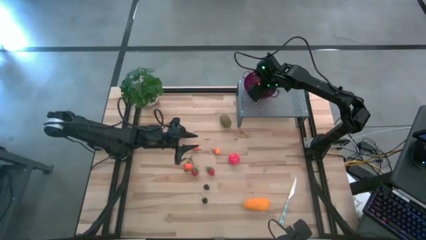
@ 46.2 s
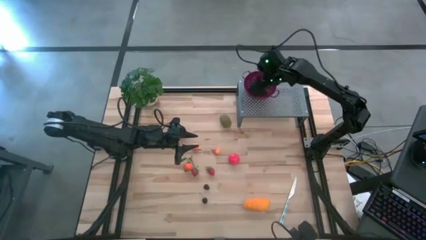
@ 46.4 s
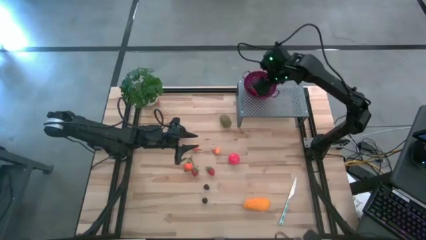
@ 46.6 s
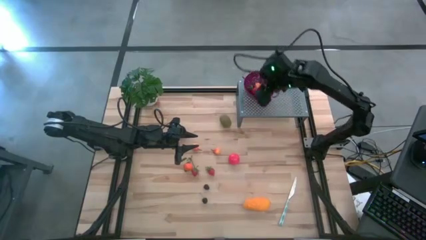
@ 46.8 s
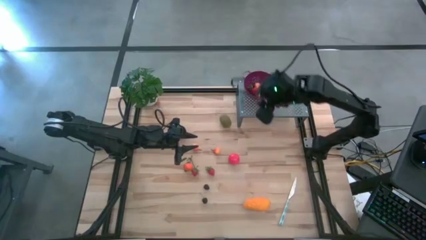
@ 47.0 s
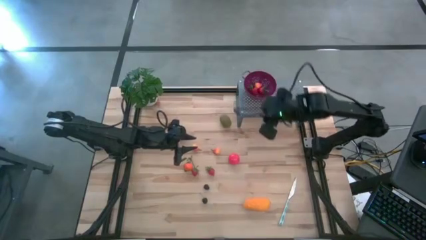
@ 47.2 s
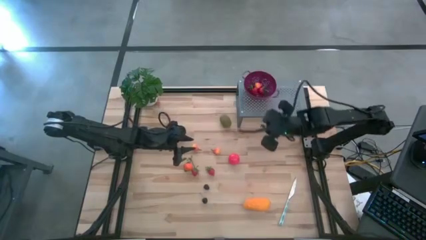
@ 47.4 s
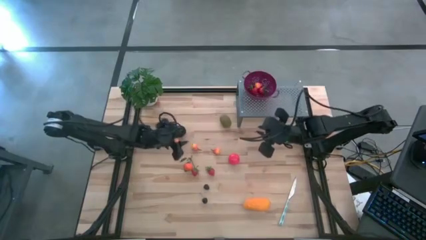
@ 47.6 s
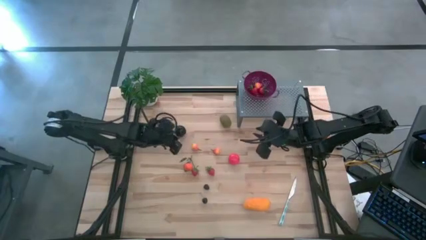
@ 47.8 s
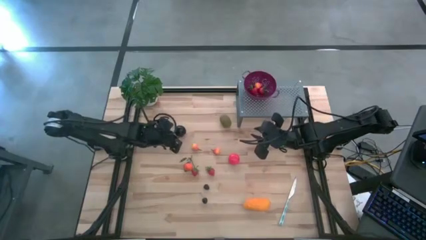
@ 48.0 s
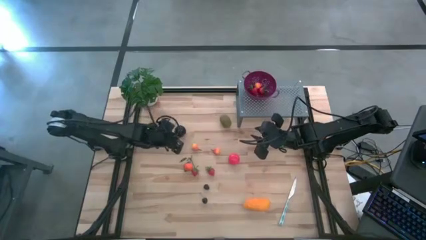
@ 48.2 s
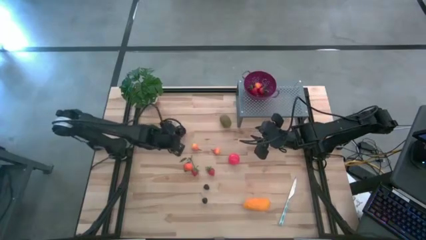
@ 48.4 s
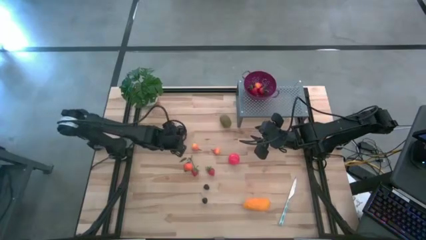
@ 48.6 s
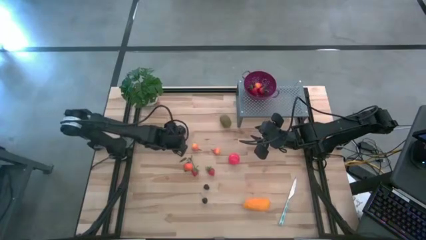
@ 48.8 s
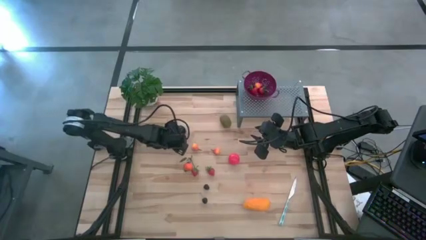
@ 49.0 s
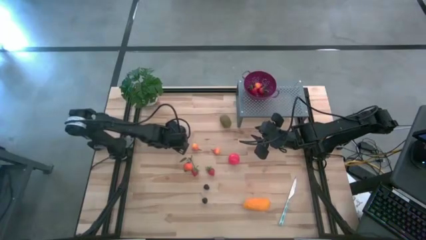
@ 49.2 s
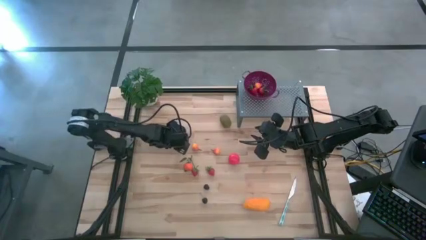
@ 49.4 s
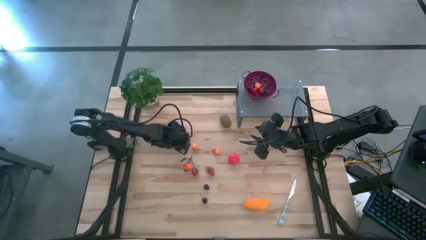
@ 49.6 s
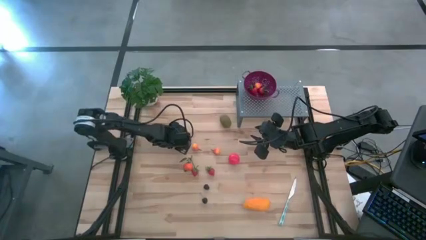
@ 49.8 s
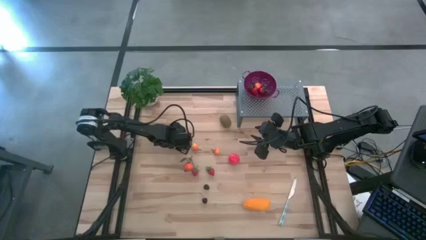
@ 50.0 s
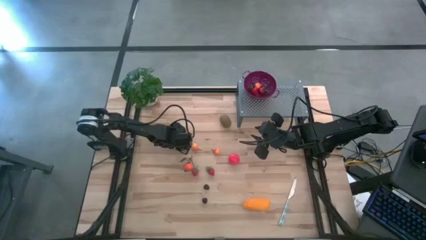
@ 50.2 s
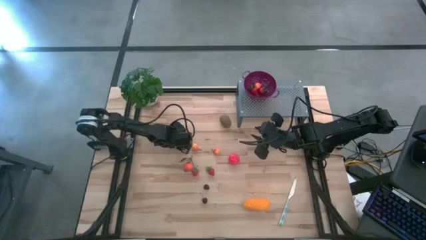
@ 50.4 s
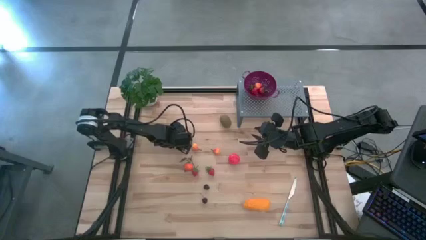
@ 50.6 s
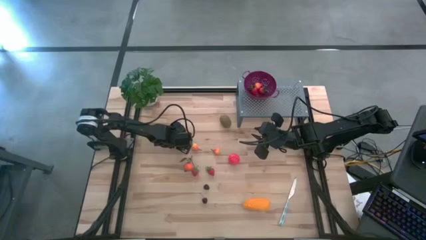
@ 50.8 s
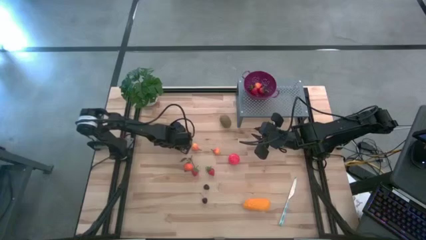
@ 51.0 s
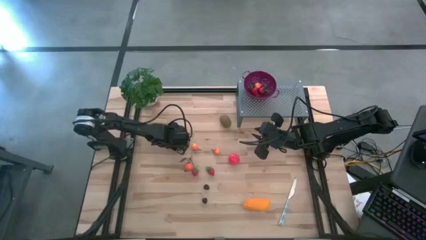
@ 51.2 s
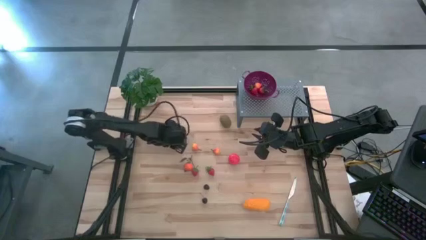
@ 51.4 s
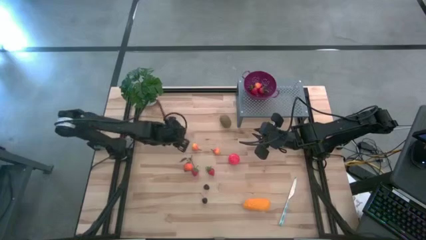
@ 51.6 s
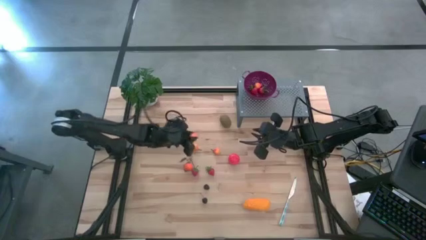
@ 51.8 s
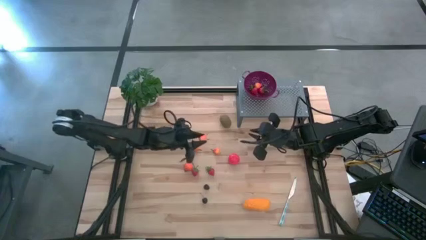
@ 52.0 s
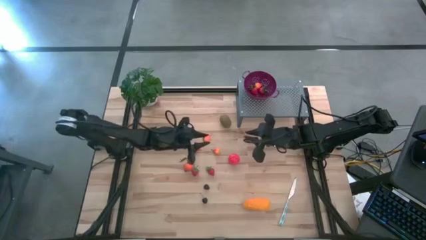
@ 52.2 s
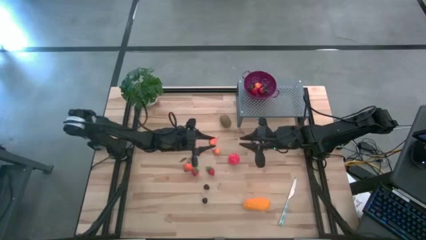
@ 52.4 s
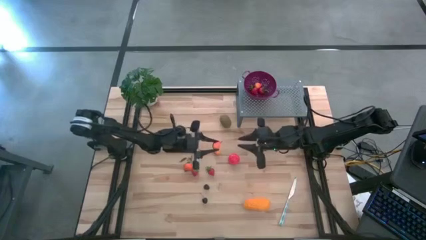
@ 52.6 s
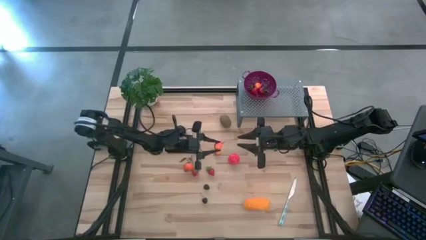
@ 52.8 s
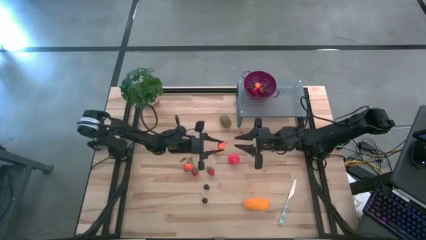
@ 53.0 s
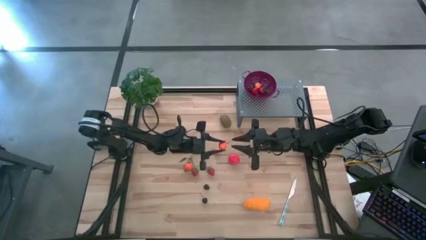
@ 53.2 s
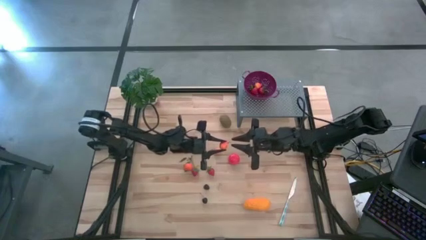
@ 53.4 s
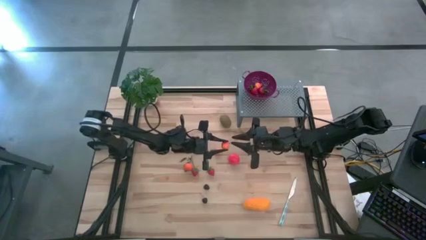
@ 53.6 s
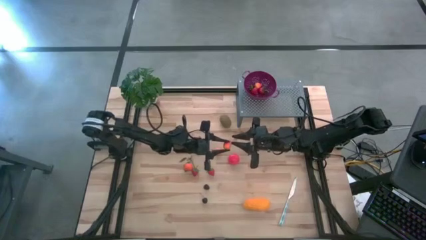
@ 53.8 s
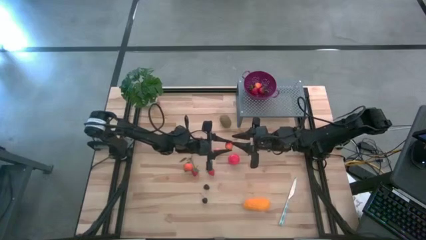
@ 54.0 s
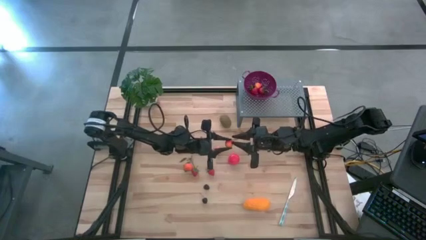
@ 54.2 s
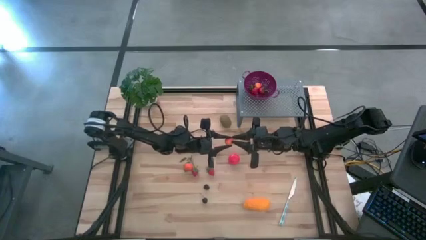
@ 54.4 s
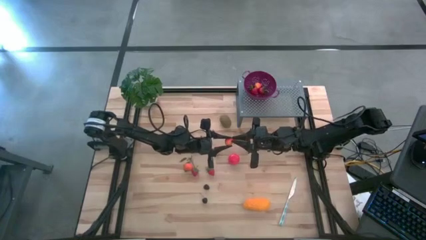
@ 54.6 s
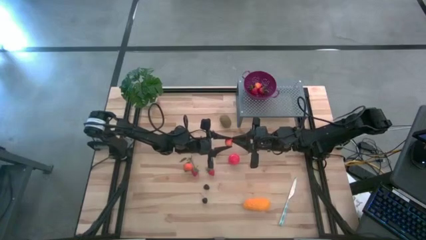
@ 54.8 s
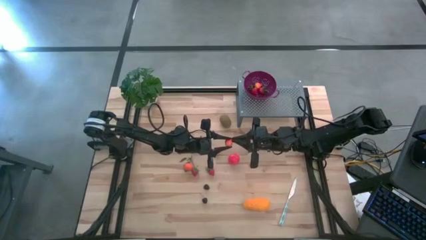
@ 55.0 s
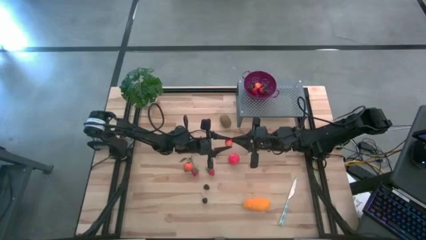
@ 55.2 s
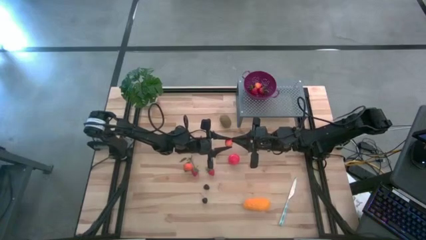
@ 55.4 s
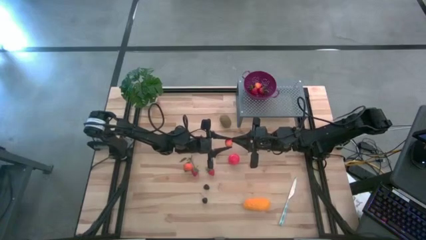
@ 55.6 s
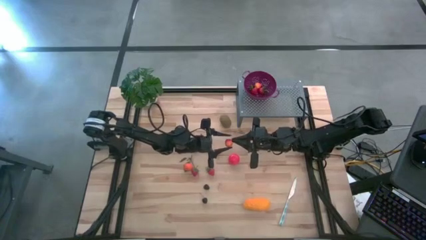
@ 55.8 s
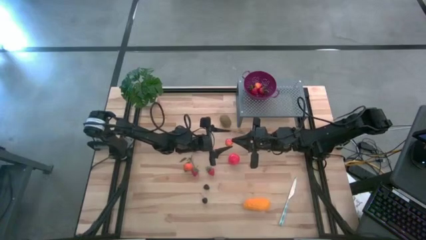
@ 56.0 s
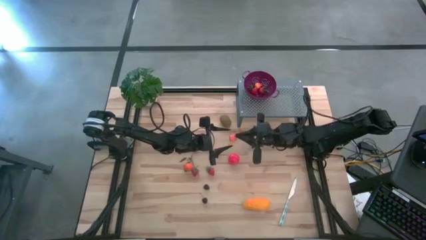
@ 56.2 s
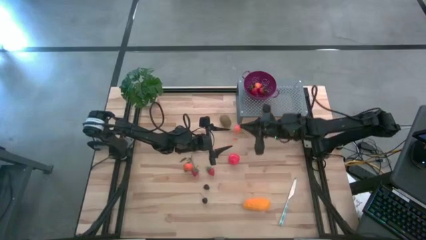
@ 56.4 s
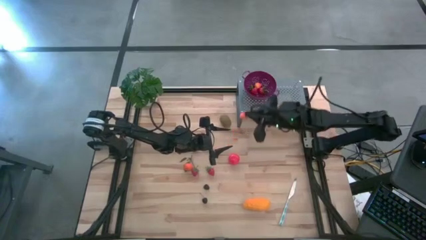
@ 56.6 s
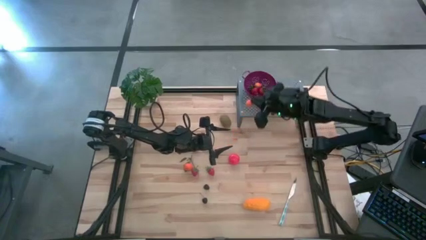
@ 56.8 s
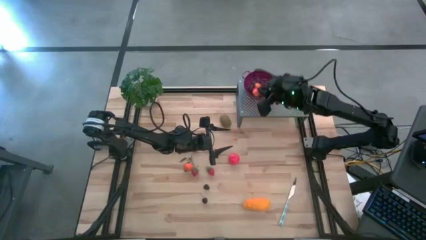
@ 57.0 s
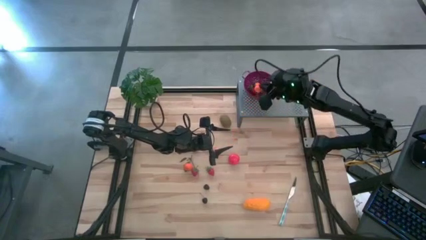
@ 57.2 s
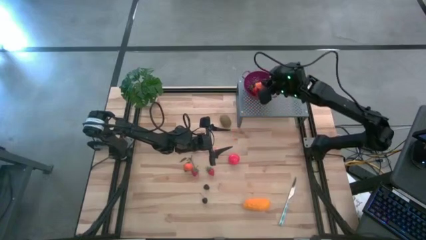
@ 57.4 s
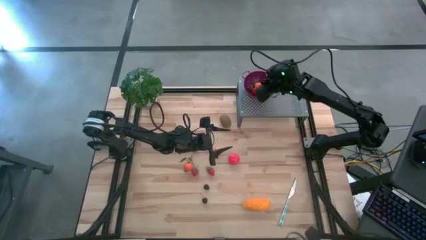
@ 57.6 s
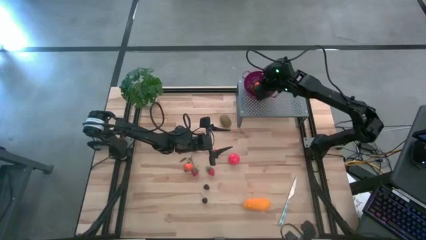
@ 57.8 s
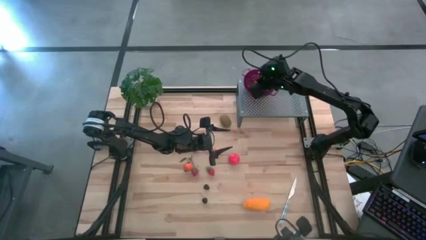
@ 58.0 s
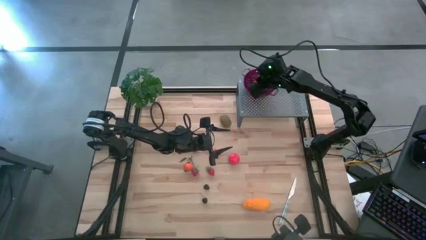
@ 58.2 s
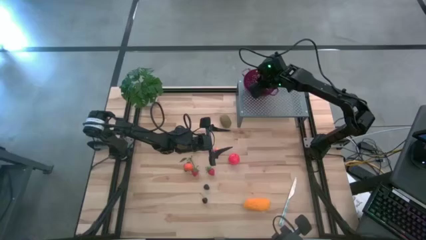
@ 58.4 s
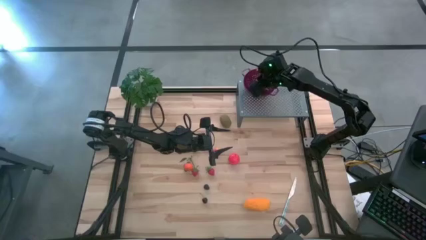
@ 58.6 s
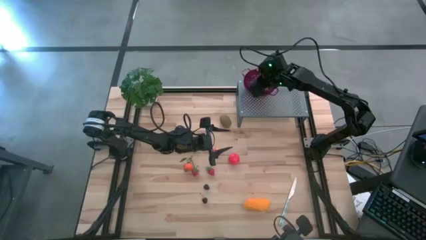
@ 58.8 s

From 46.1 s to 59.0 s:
Task: Pick & Place Fruit
Put the peach into the violet strainer bowl on the shelf

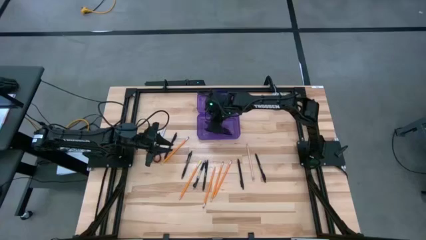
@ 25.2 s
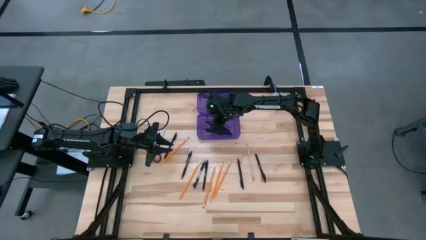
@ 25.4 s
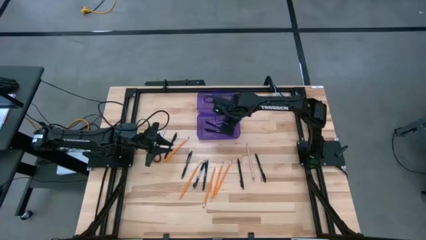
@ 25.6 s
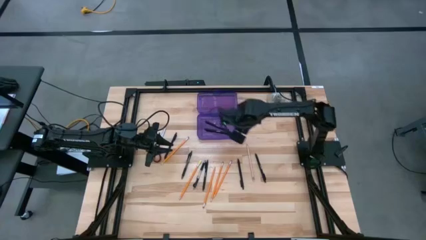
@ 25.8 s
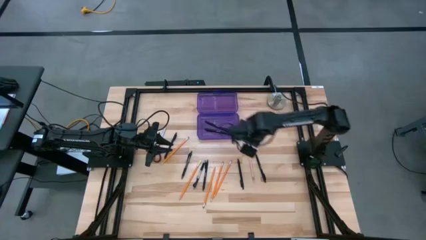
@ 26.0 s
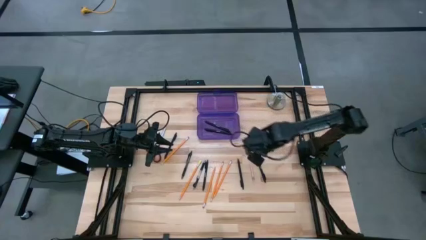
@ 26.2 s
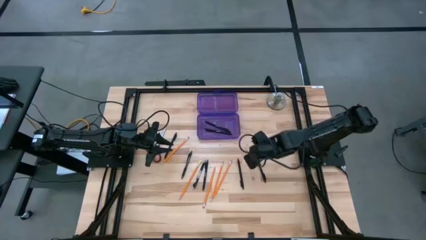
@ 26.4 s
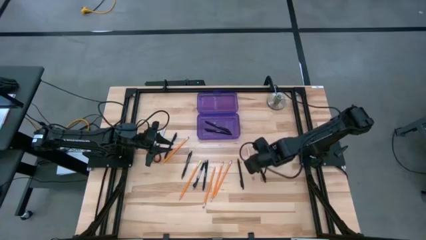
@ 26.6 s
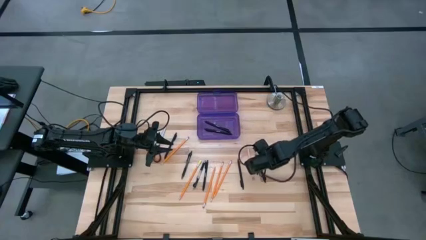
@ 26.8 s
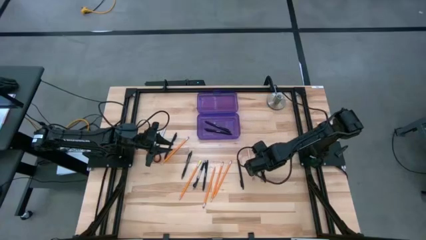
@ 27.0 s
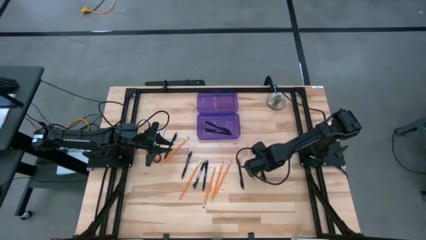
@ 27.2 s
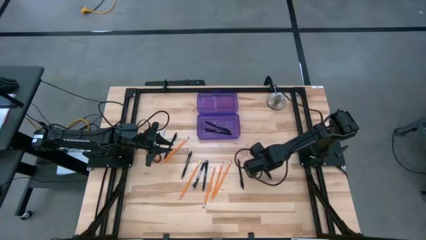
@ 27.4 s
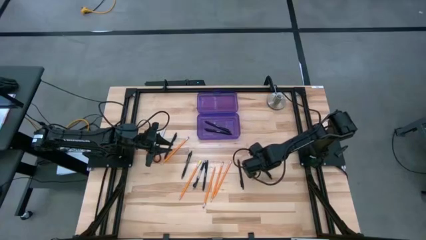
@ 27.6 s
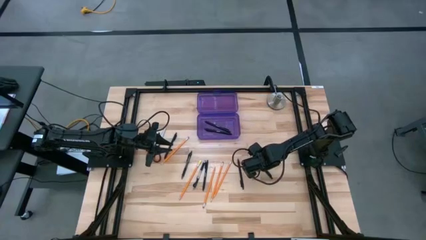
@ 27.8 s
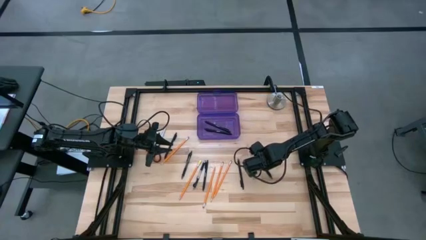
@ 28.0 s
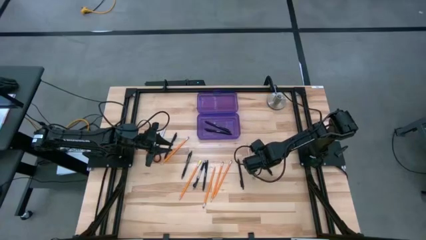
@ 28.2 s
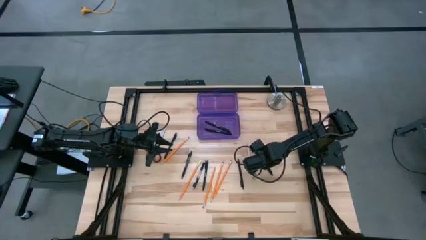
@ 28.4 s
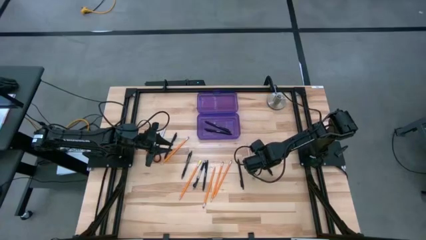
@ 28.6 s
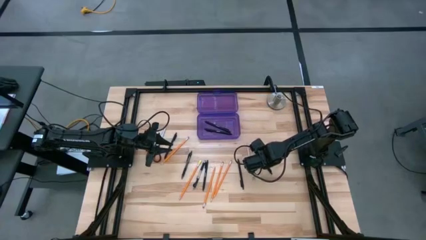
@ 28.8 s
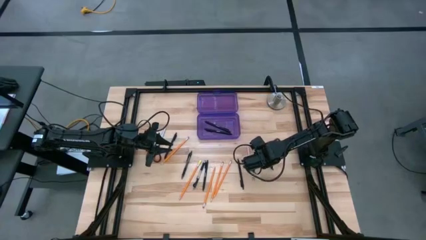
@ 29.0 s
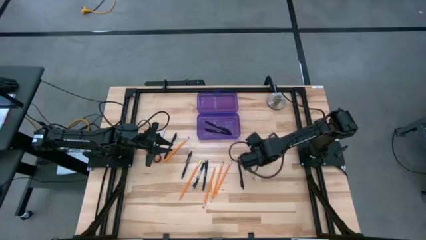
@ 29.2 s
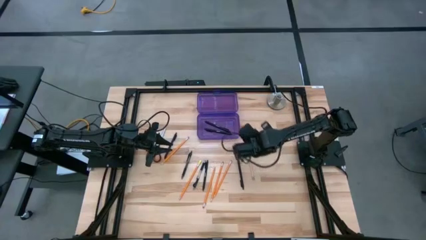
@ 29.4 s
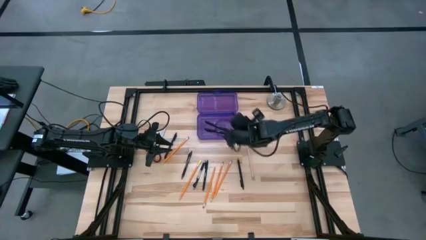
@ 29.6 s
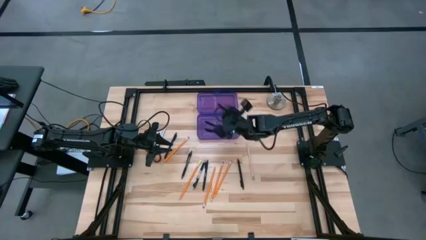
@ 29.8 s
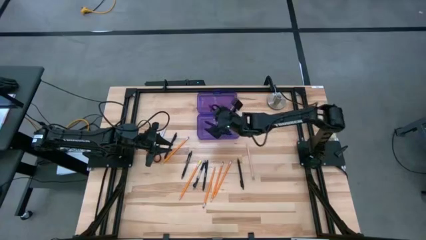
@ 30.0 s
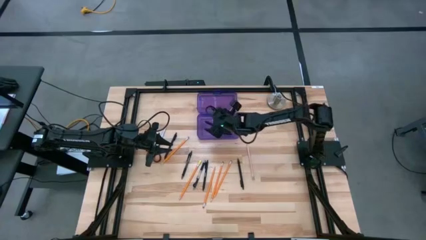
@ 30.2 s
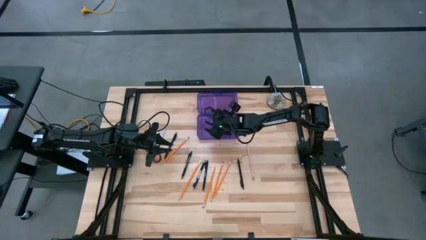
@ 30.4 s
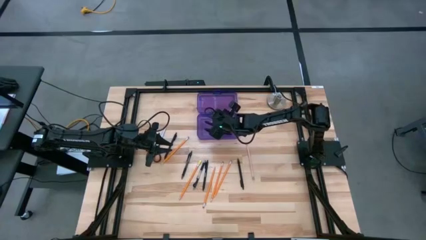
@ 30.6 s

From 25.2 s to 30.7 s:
Task: Pick & place school supplies into a supply box
Put the black pen into the the purple supply box
